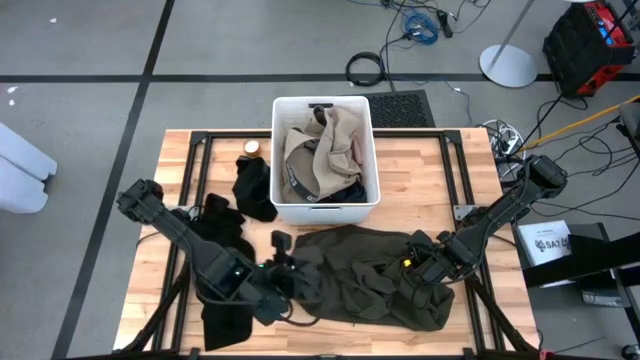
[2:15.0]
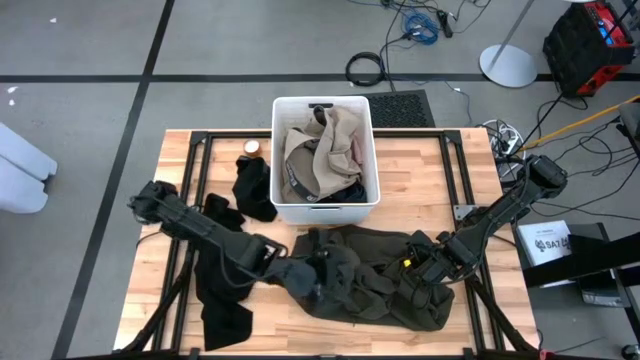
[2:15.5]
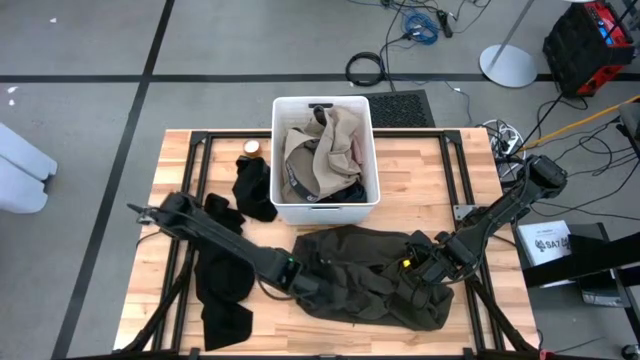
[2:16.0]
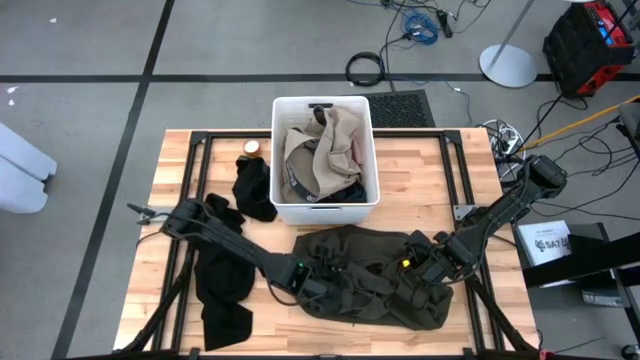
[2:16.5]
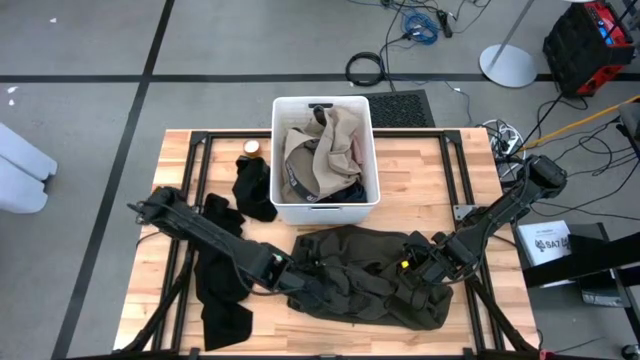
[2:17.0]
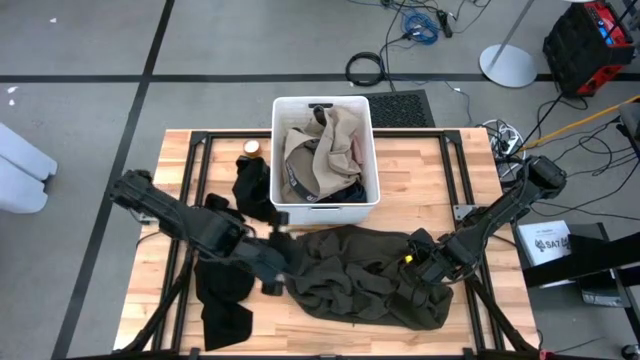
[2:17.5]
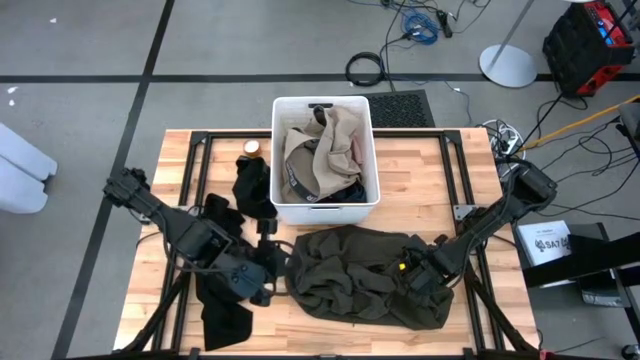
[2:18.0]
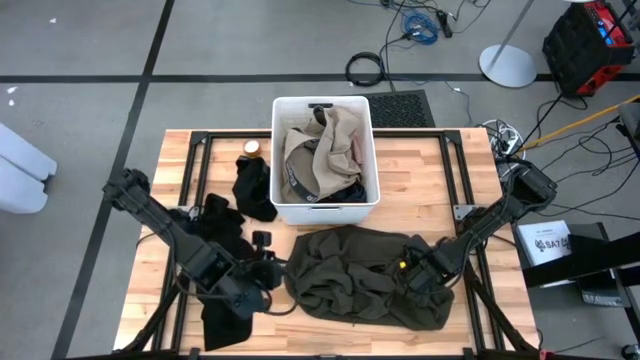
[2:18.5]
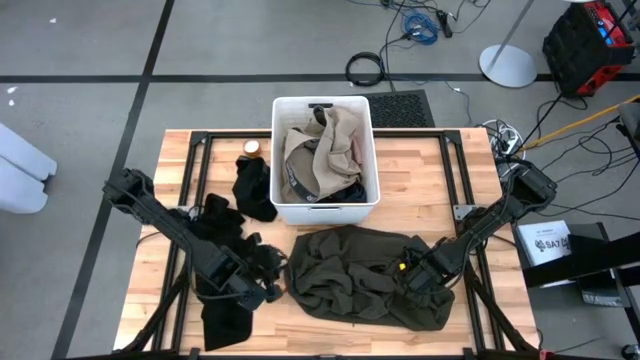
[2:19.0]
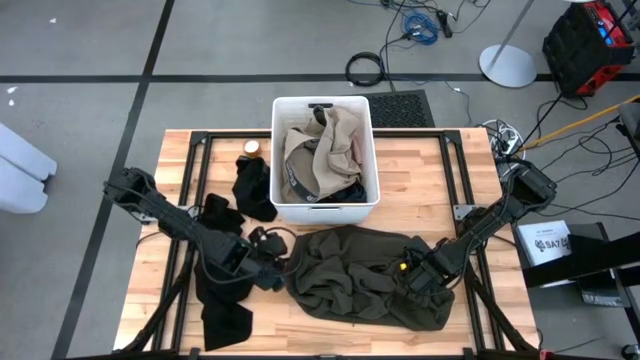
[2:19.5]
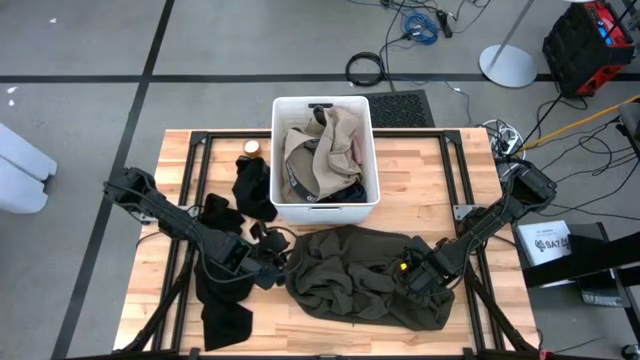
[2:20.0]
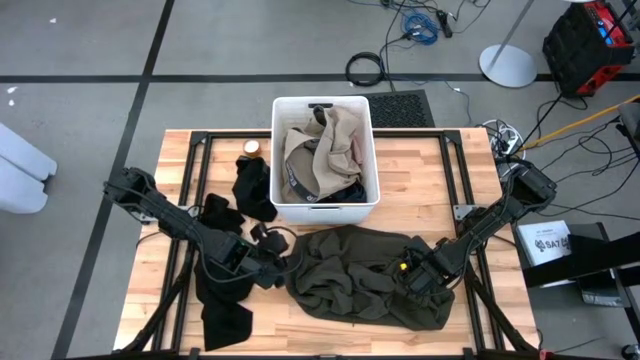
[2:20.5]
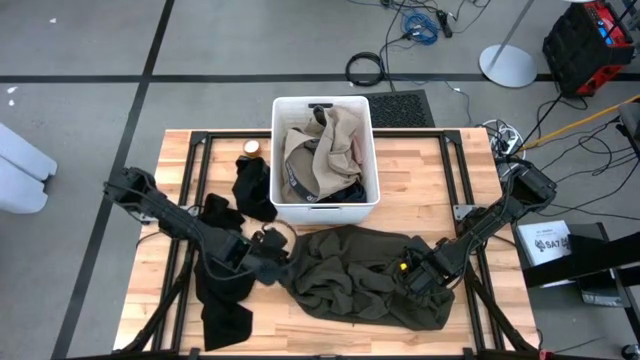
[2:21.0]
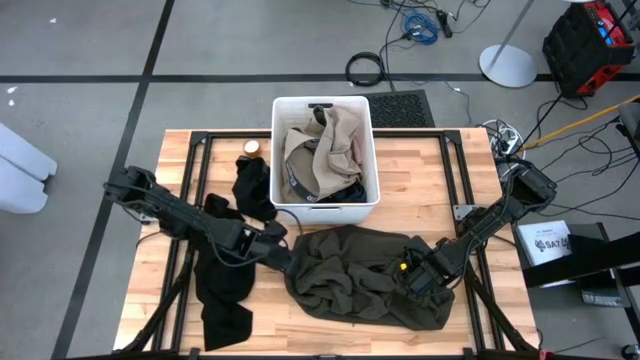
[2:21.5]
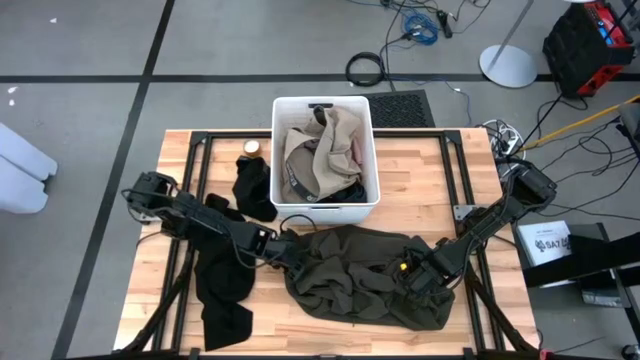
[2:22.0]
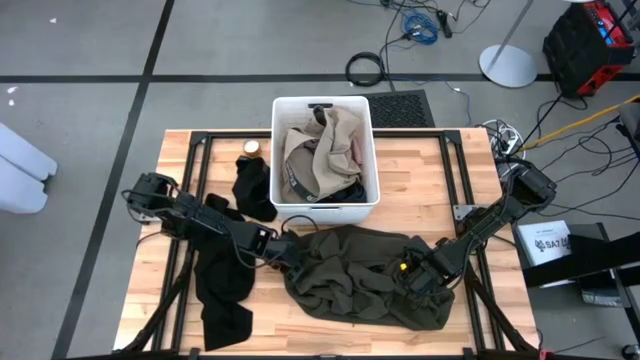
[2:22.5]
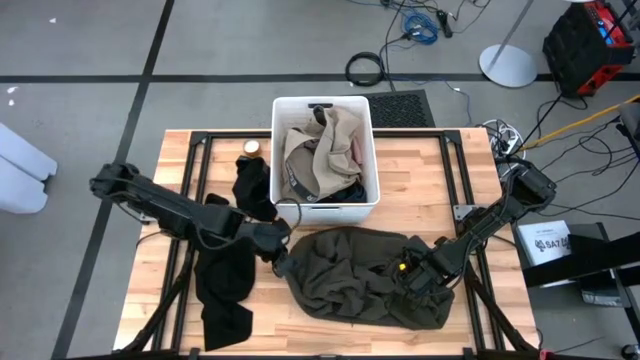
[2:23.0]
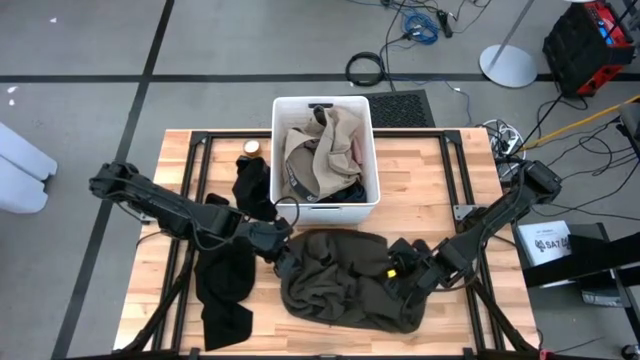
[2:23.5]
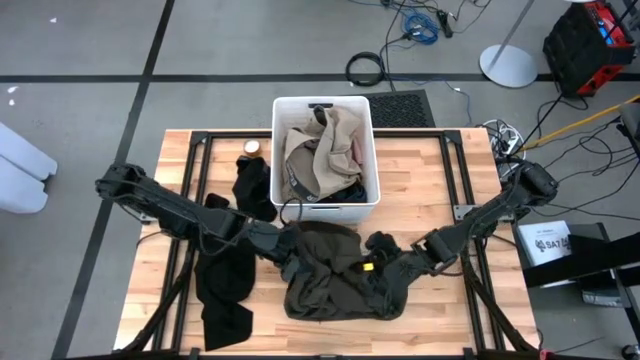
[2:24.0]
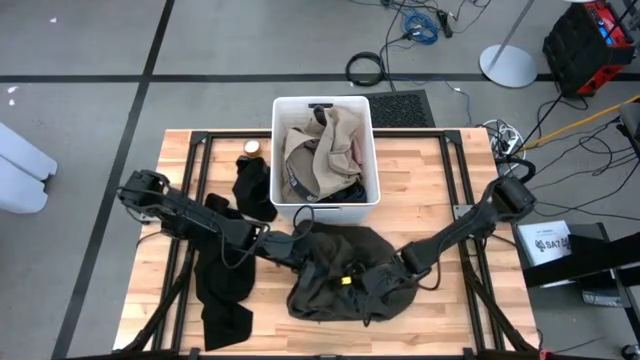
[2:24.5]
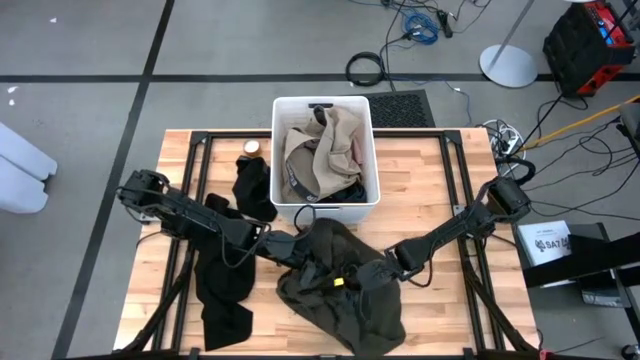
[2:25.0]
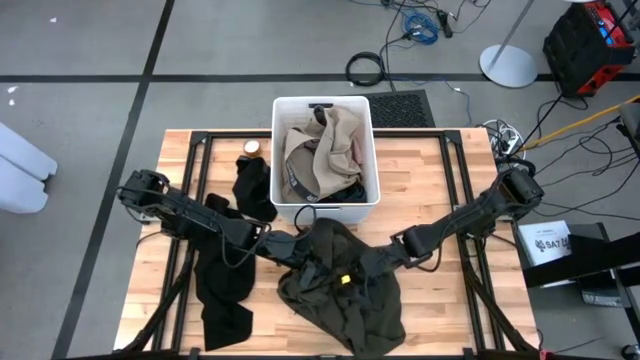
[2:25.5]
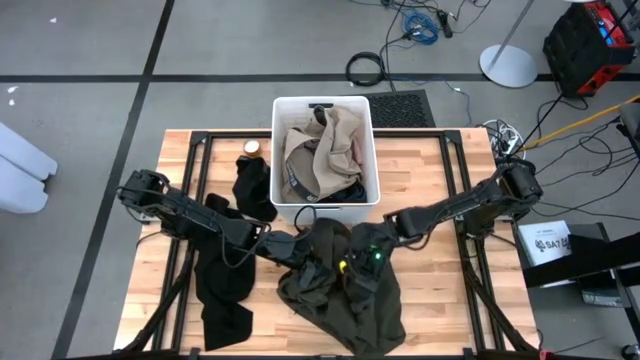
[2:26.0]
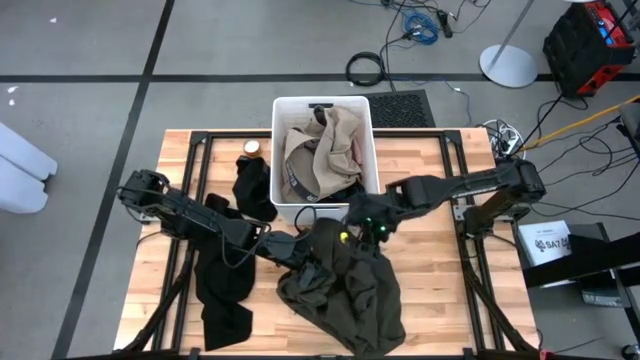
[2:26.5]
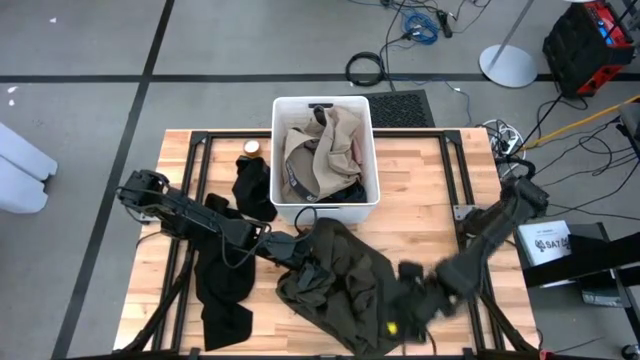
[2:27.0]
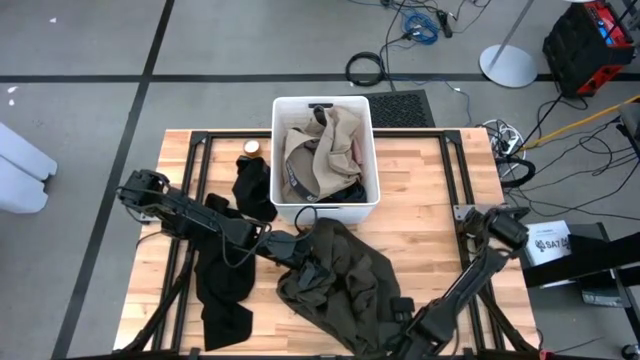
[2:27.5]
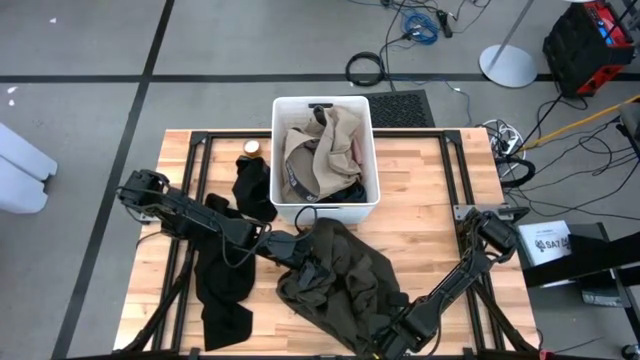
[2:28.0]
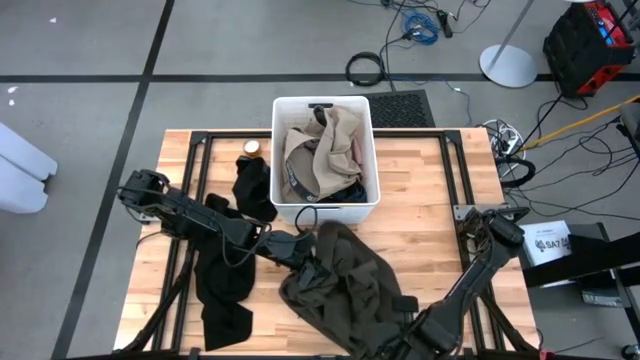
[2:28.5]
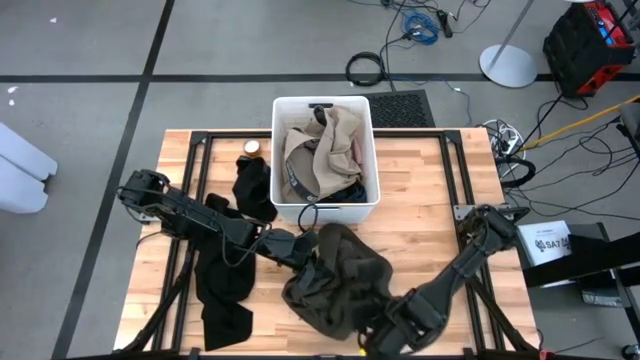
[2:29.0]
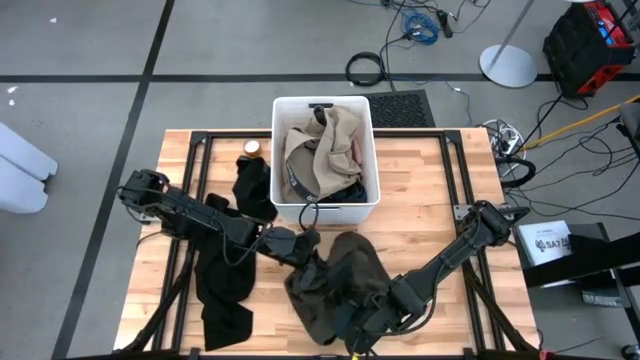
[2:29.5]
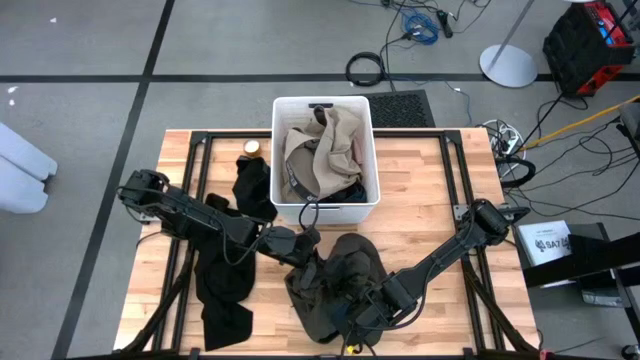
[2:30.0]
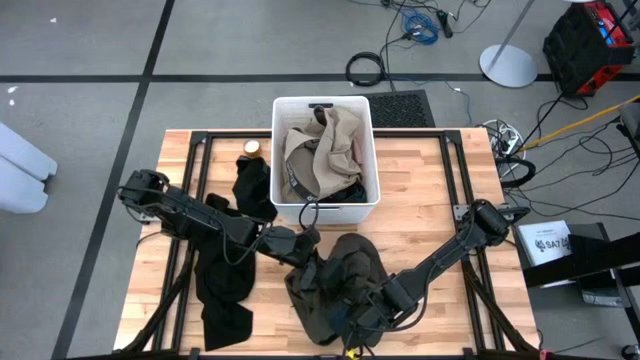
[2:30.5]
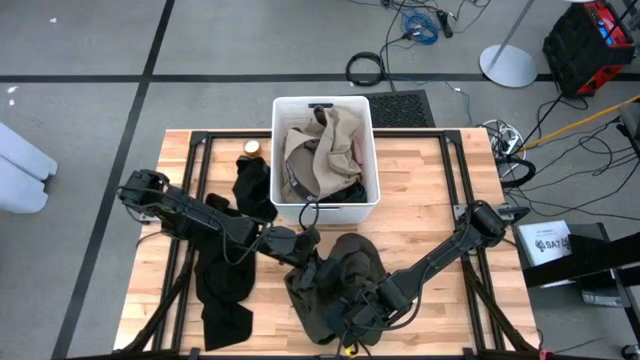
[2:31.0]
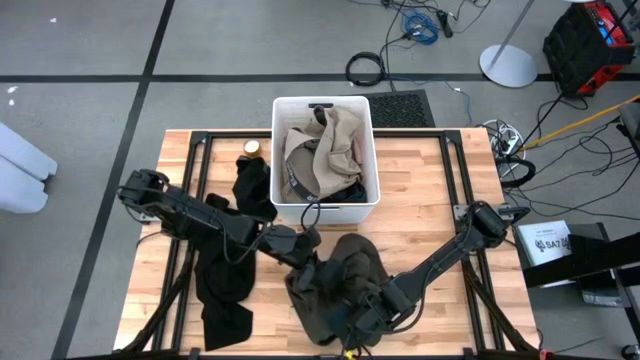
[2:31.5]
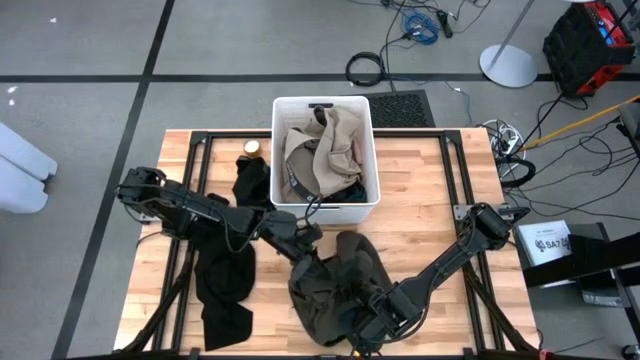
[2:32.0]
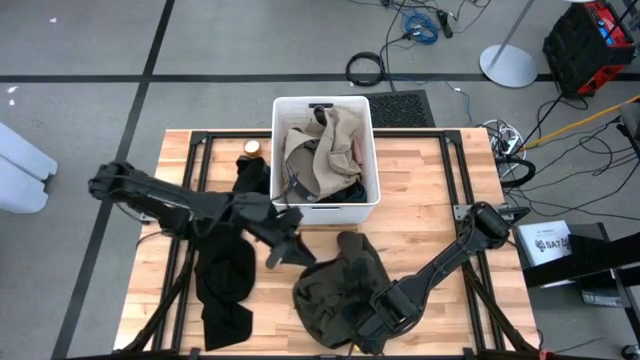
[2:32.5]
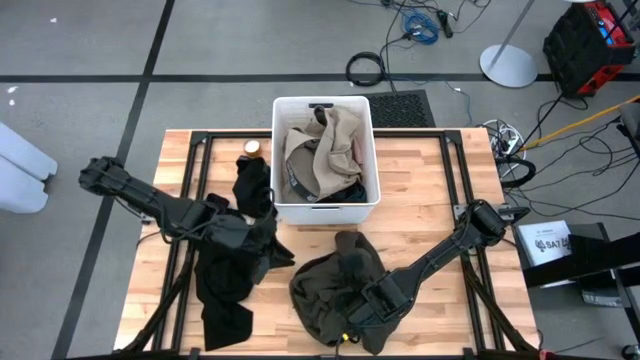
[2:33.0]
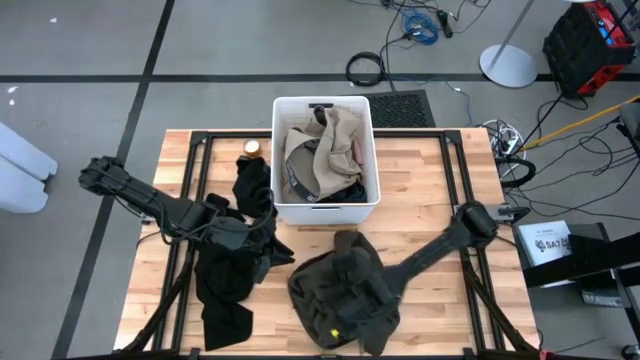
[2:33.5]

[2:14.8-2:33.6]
Task: Fold laundry
Fold the black jacket into the white laundry bin

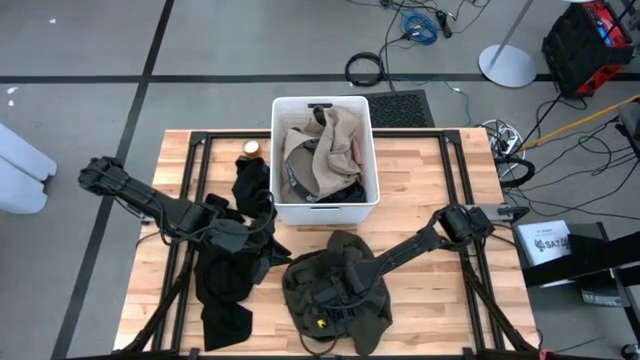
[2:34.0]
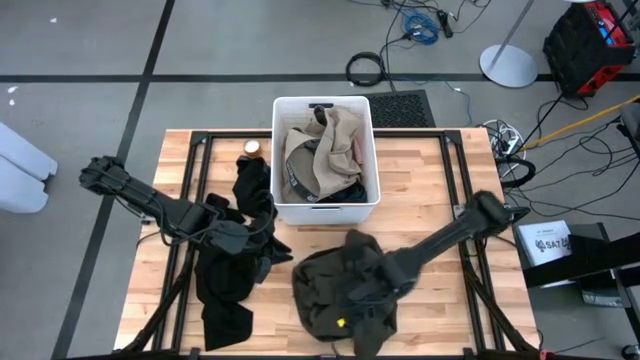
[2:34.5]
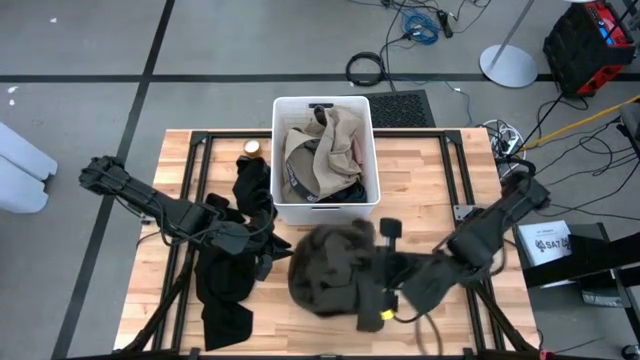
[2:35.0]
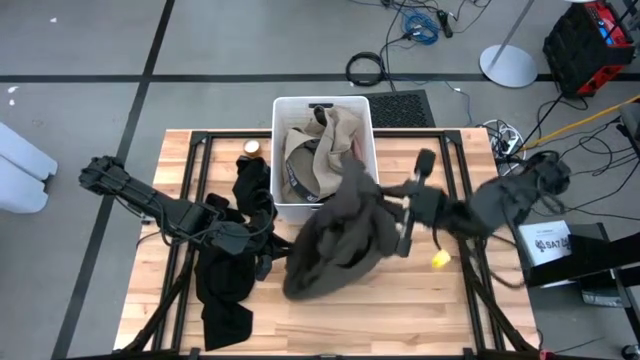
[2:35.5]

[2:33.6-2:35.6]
Put the folded black jacket into the white laundry bin

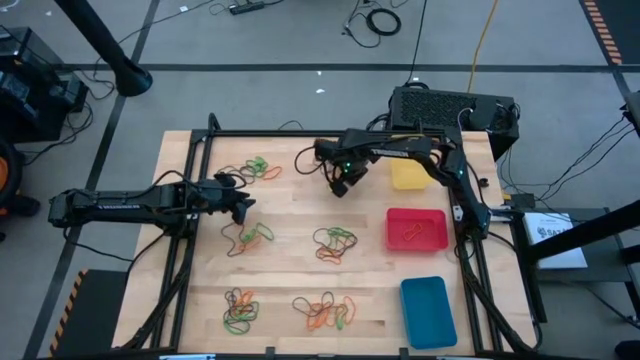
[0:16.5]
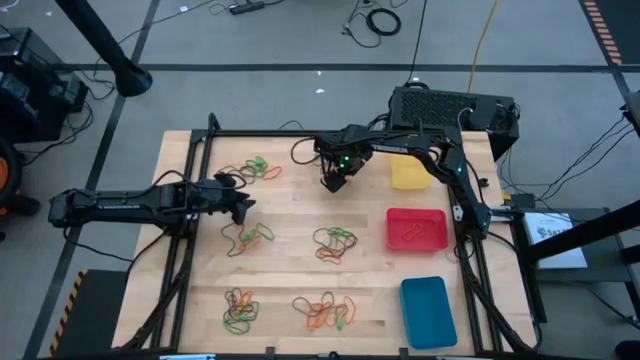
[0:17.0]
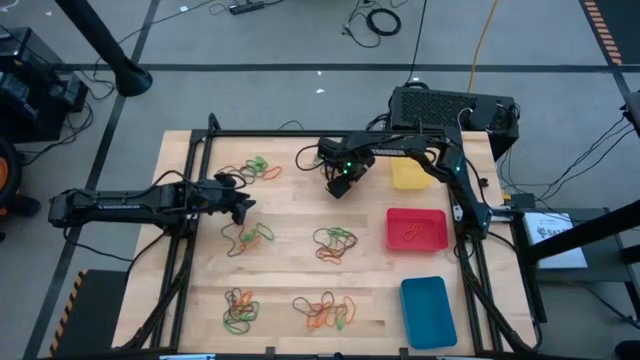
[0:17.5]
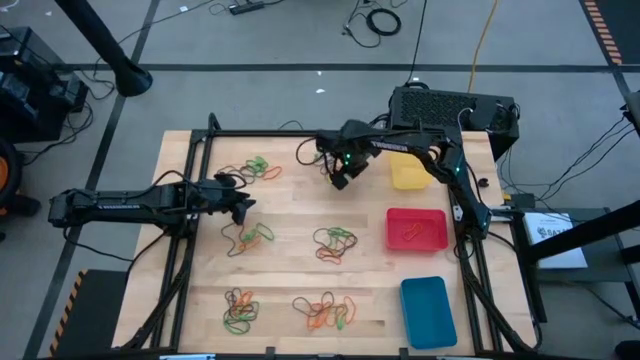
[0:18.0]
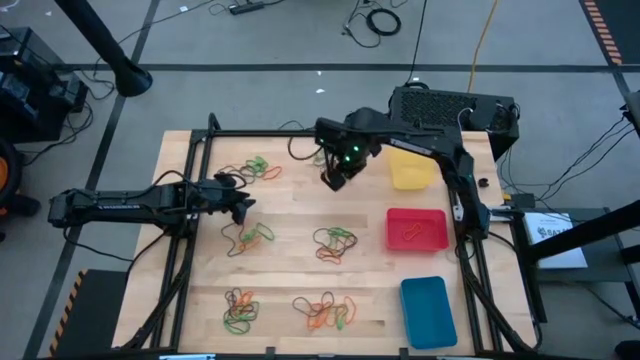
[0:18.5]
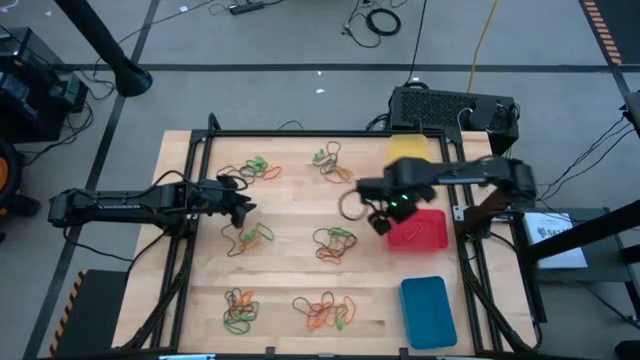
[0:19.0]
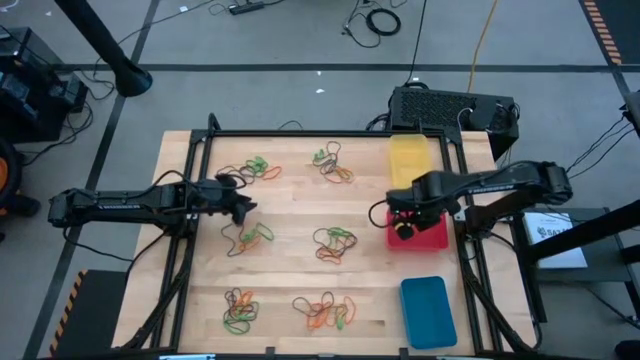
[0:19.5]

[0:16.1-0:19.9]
Task: Sort rubber bands into baskets
Put the orange rubber band into the red bin
